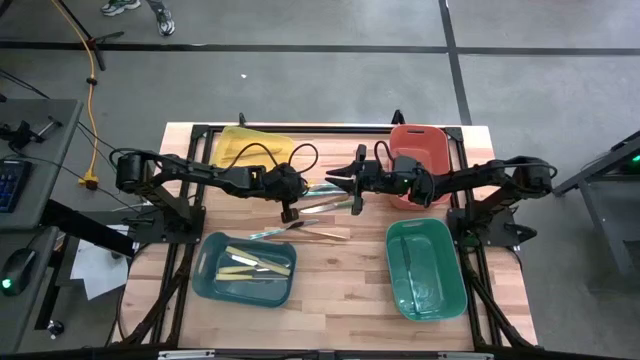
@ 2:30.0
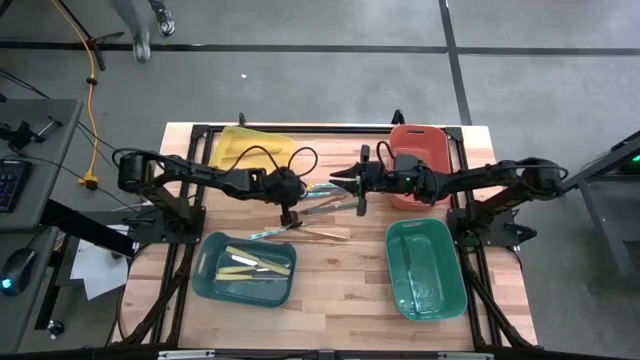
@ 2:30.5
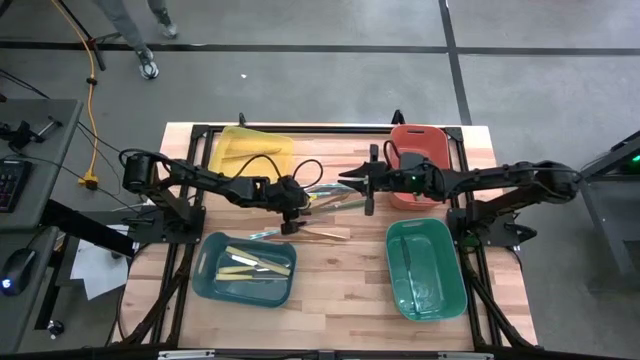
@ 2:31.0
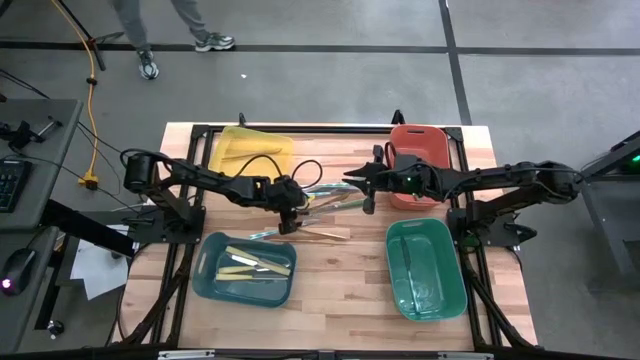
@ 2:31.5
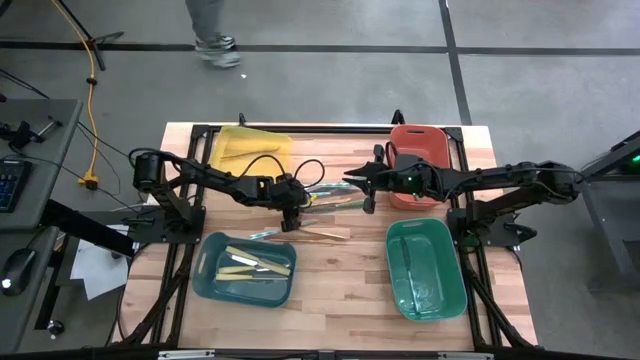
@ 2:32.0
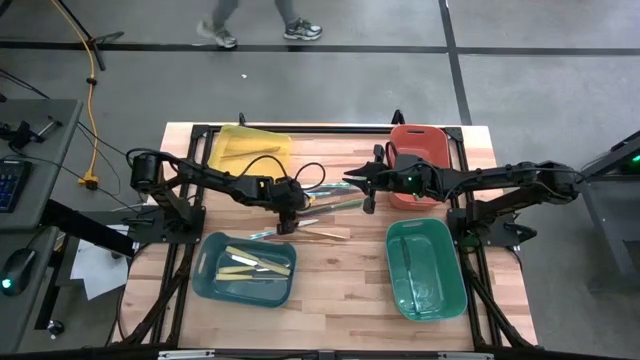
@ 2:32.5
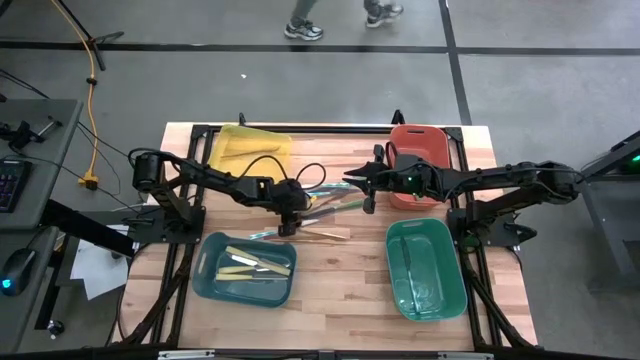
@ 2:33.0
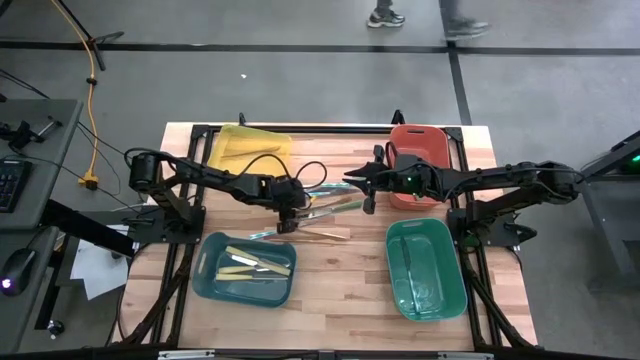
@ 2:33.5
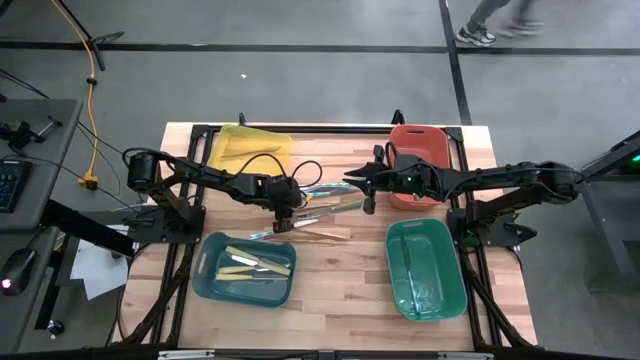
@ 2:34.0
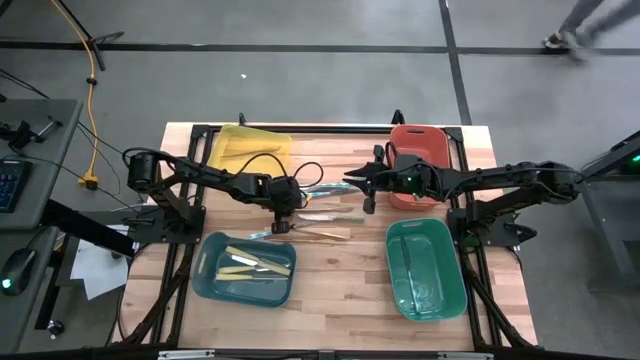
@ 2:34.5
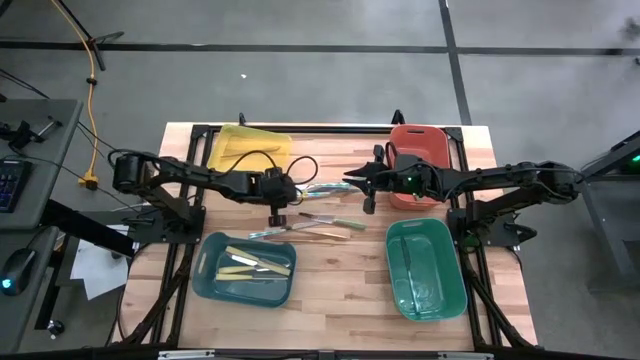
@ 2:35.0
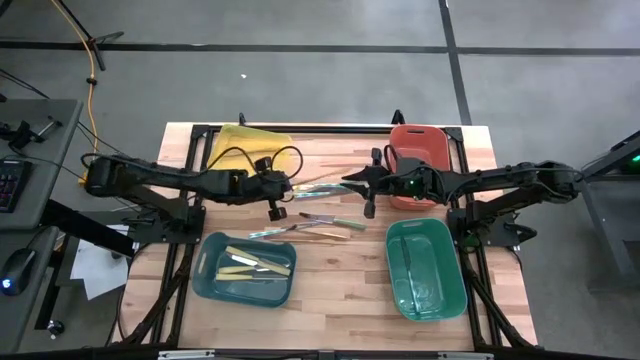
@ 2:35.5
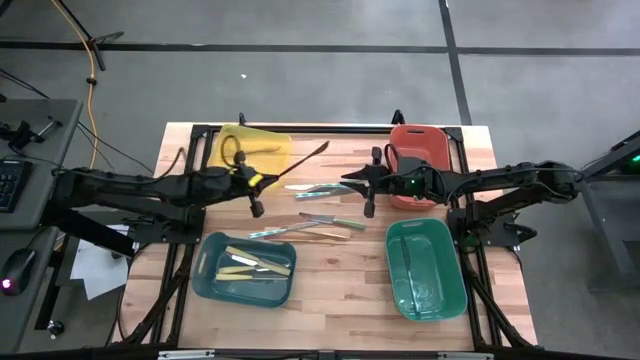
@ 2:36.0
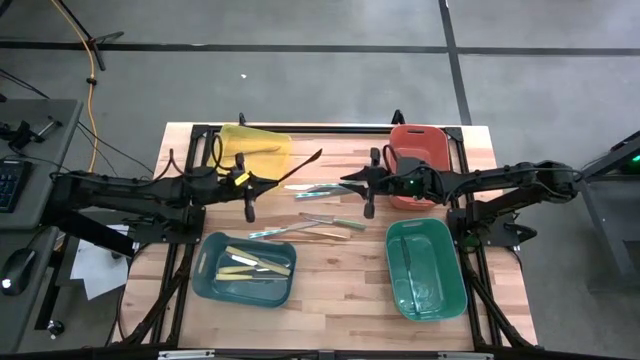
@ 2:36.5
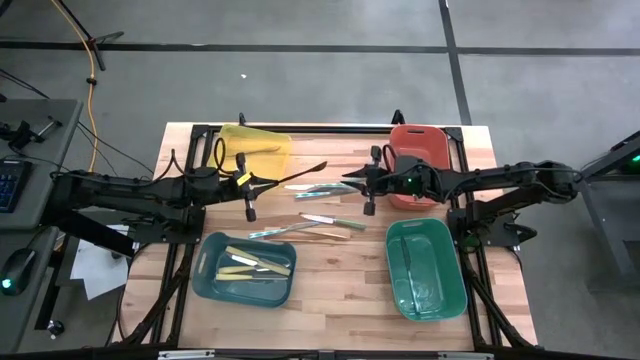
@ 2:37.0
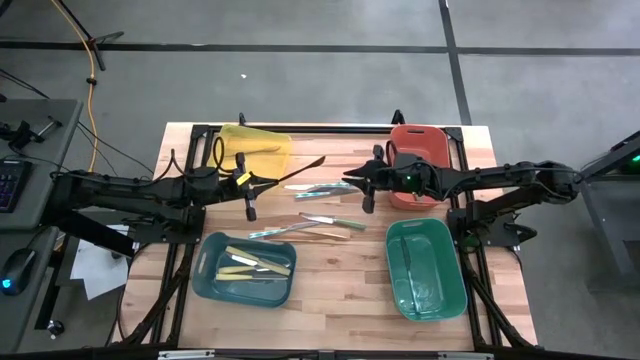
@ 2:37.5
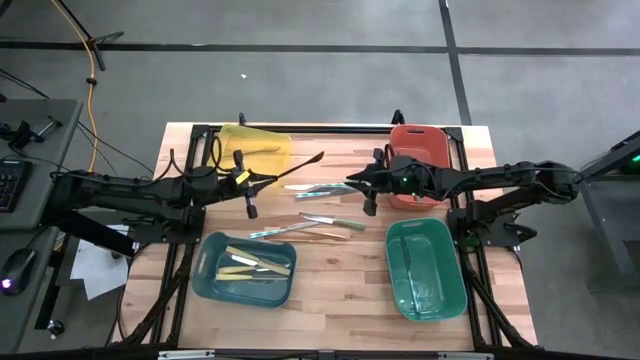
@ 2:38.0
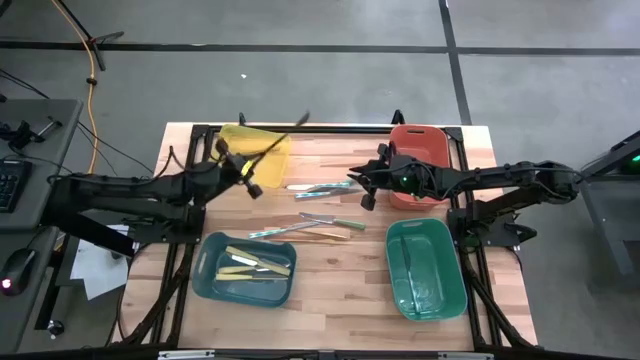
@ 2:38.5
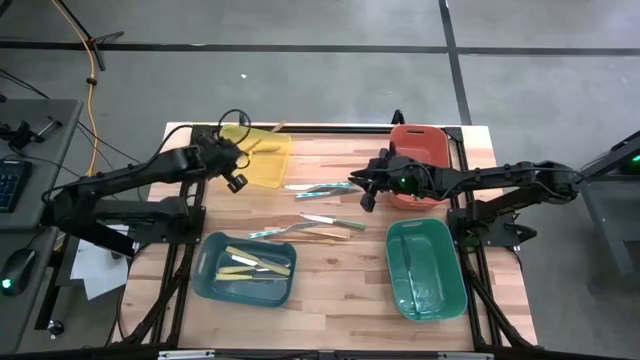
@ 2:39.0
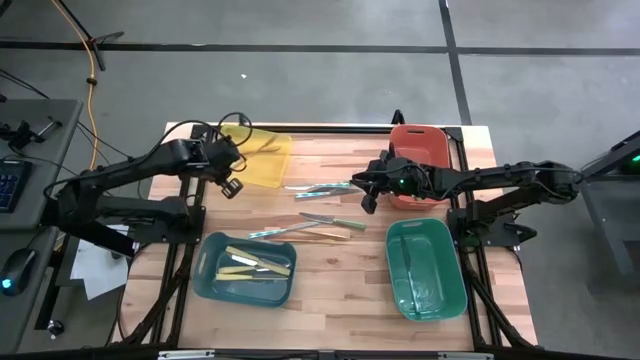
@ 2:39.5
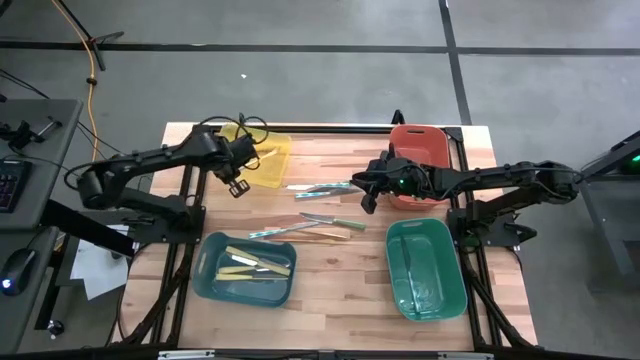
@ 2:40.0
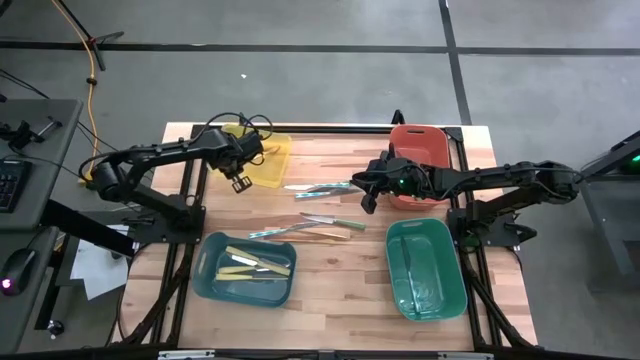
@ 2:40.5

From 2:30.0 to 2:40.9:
Task: Sort silverware by color (type)
Put the gold knife into the yellow bin

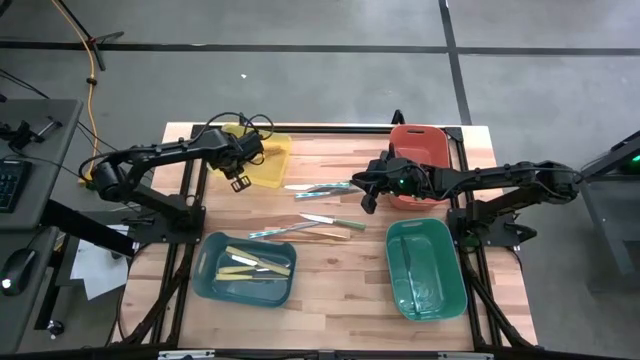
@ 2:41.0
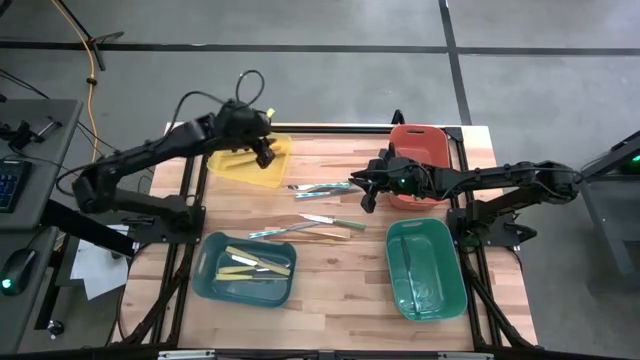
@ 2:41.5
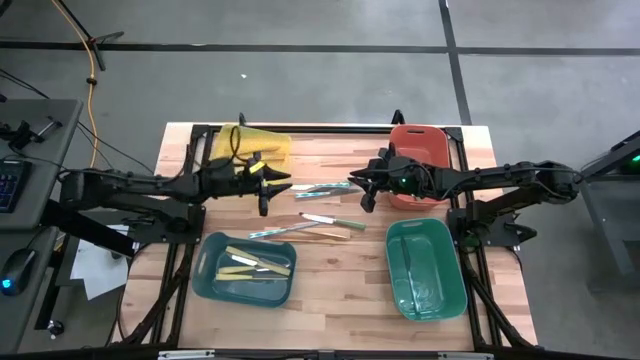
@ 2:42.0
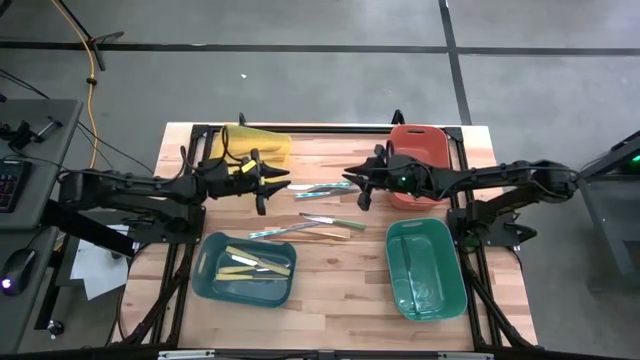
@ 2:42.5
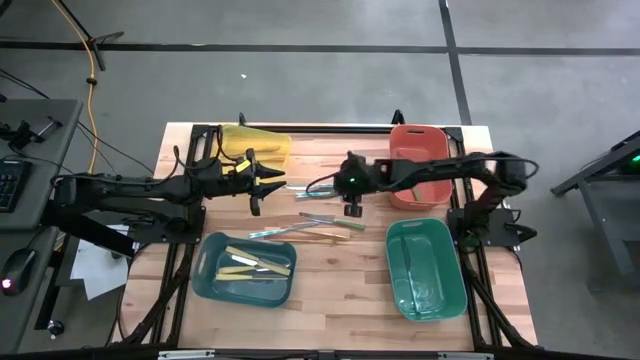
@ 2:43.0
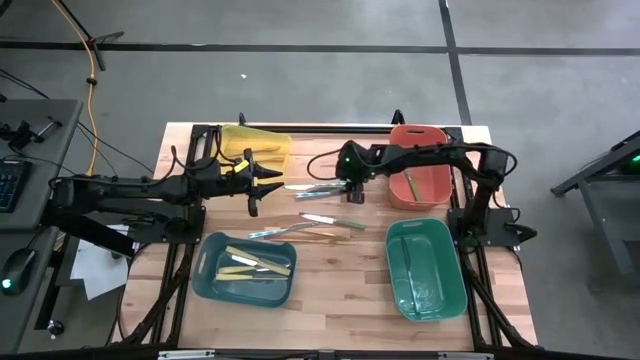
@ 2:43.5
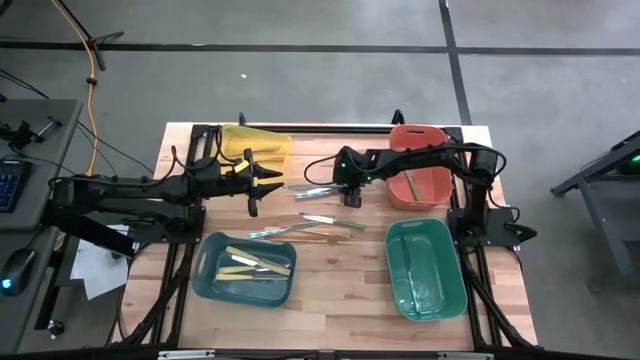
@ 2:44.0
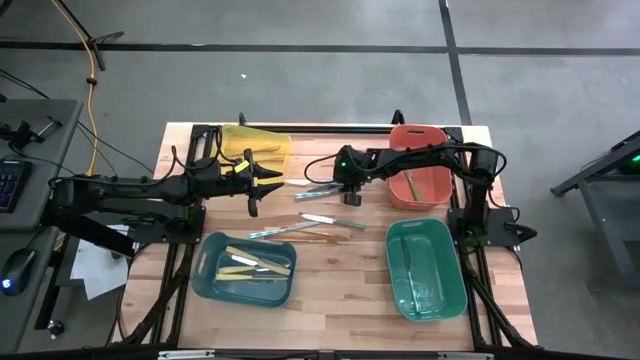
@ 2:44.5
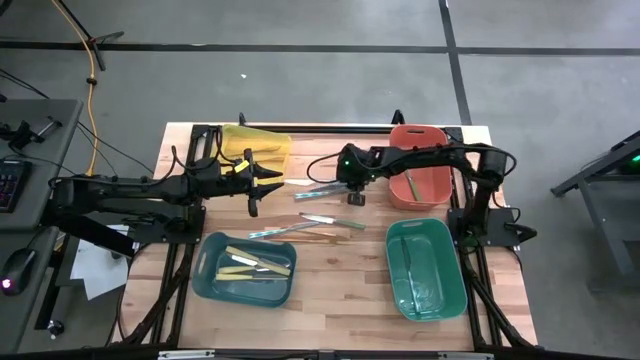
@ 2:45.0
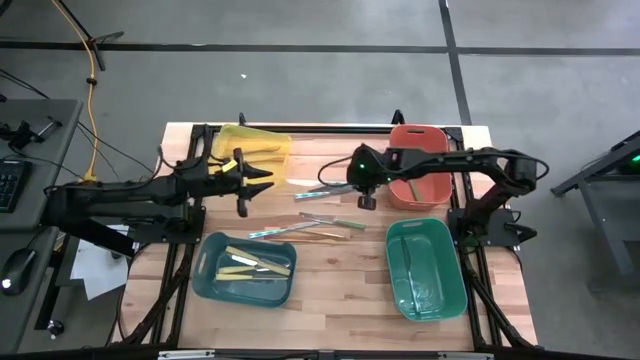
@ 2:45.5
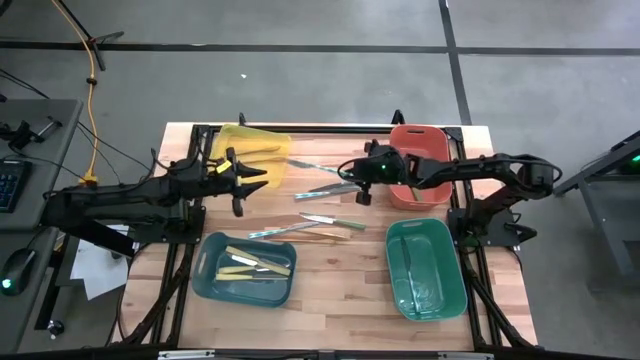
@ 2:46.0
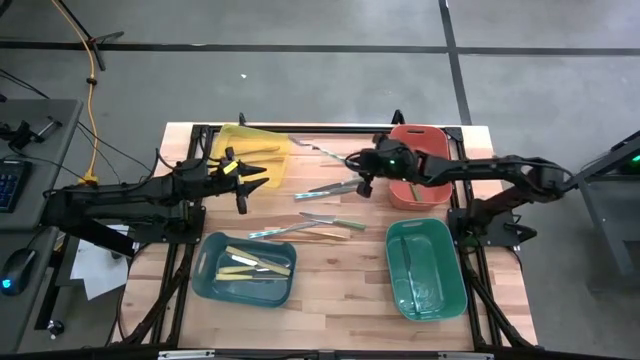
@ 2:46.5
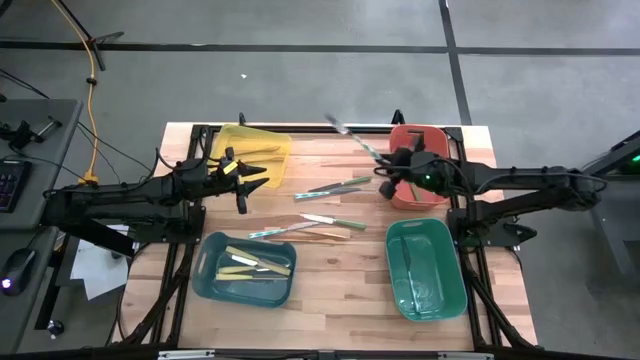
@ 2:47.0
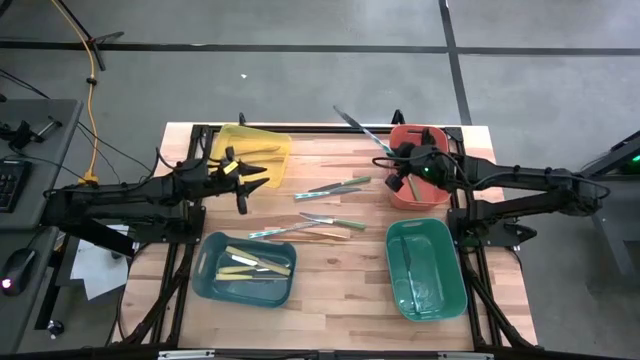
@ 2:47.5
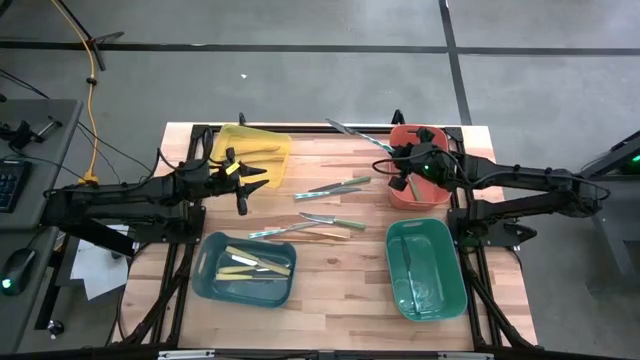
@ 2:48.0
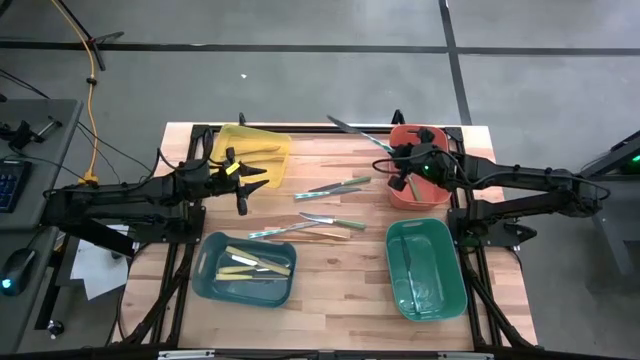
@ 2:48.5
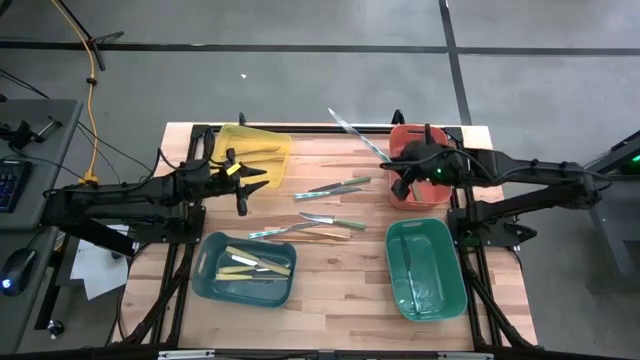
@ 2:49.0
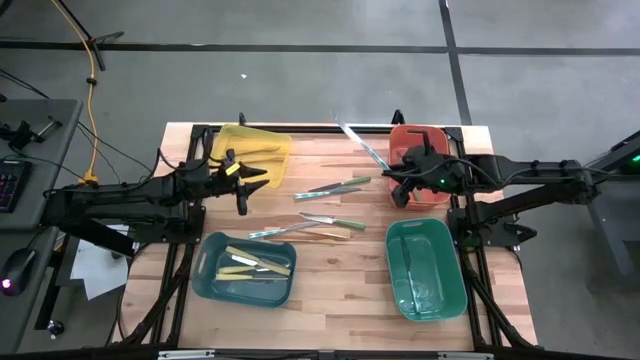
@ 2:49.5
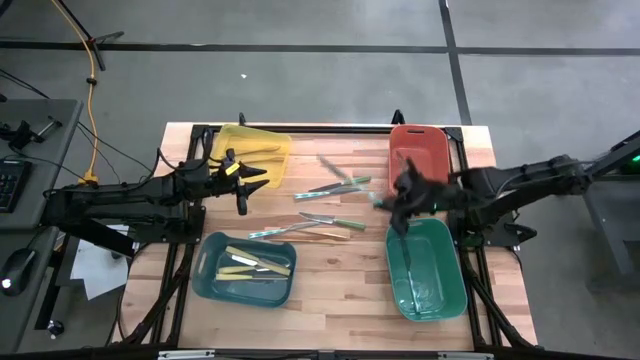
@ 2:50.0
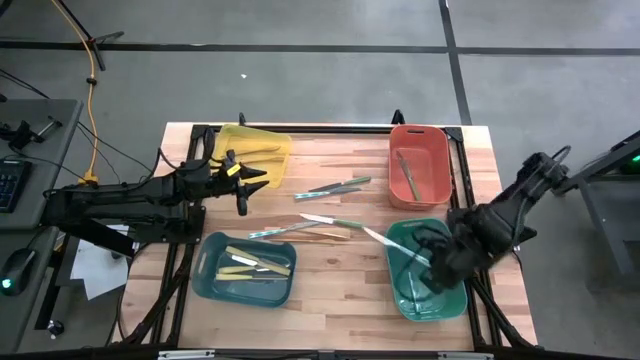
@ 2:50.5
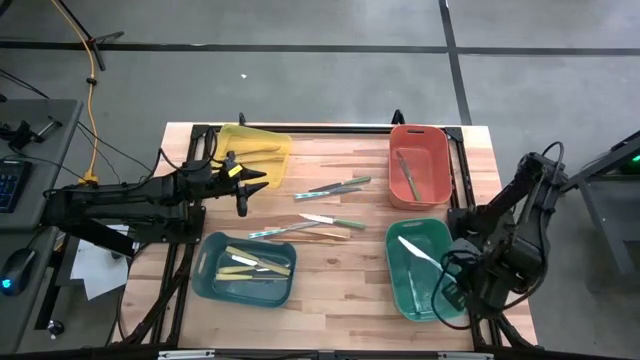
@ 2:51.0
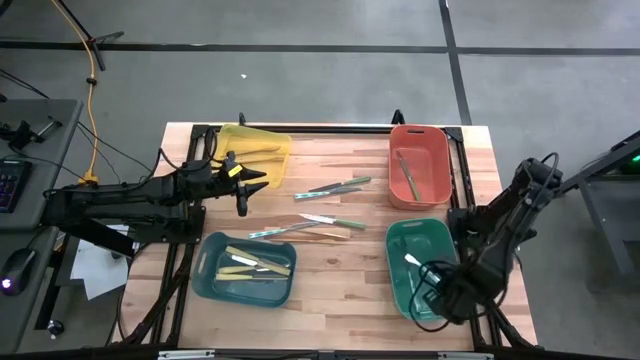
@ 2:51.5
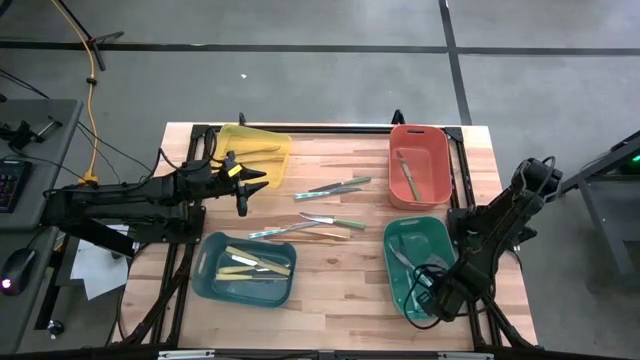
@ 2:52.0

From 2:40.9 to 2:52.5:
Put the patterned green knife into the green bin
